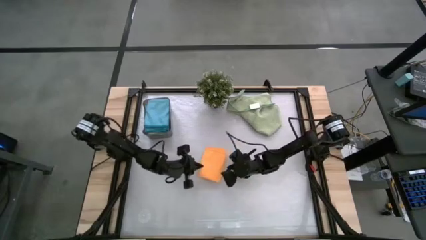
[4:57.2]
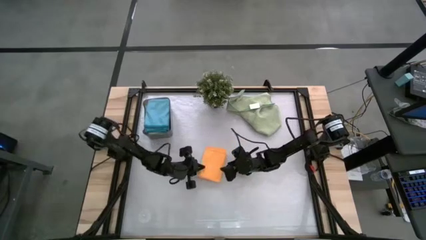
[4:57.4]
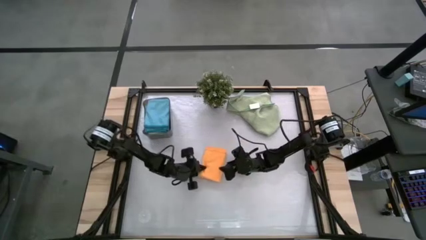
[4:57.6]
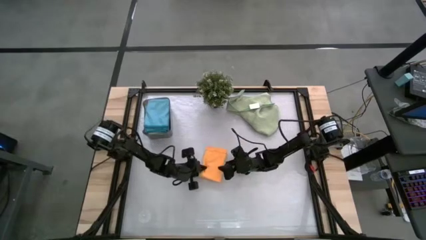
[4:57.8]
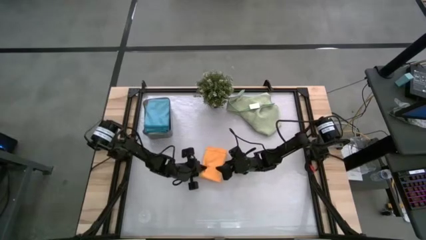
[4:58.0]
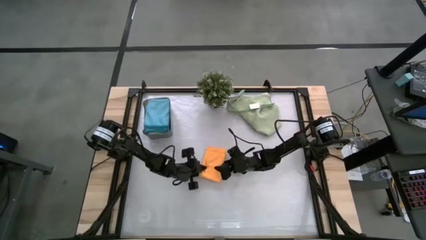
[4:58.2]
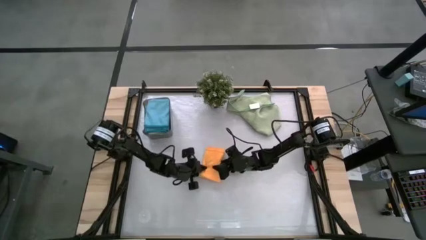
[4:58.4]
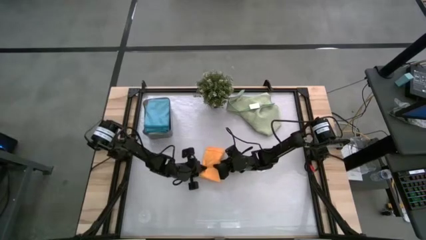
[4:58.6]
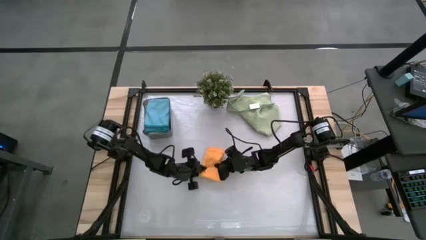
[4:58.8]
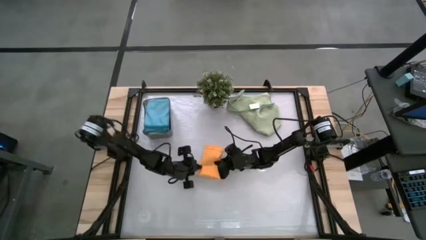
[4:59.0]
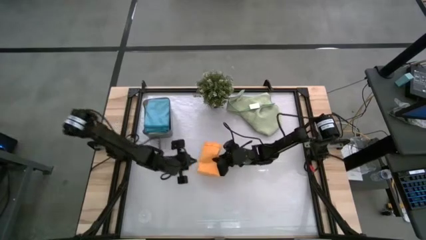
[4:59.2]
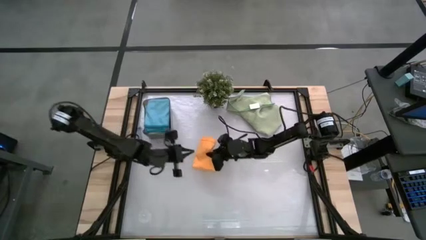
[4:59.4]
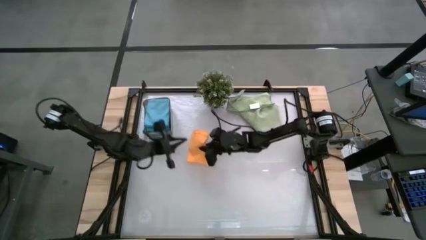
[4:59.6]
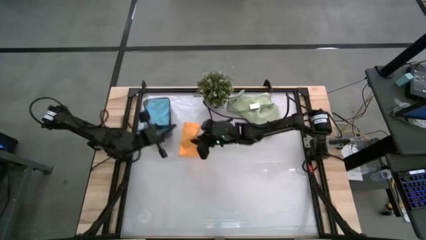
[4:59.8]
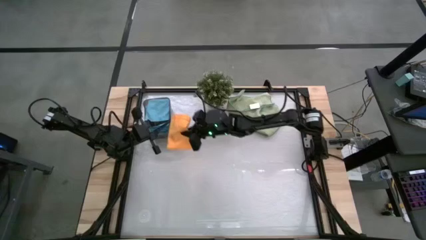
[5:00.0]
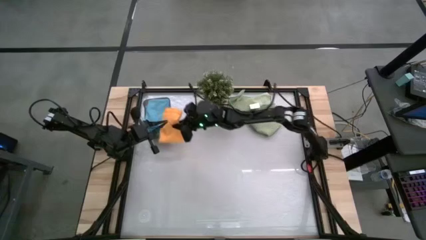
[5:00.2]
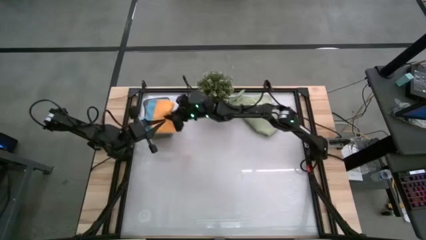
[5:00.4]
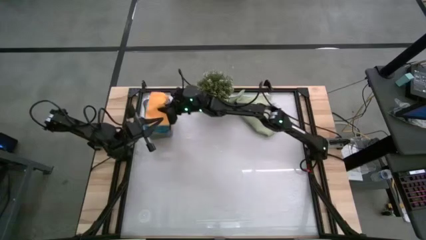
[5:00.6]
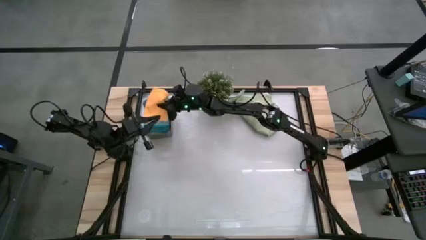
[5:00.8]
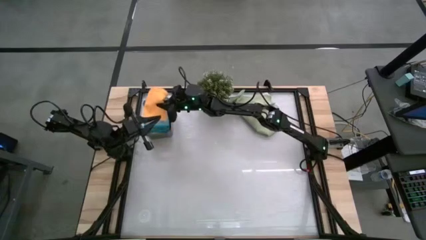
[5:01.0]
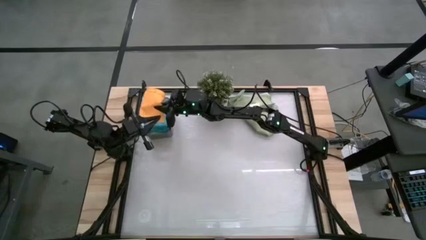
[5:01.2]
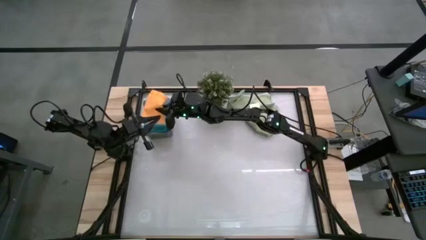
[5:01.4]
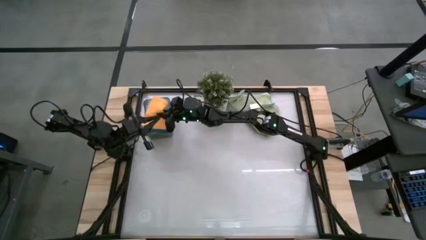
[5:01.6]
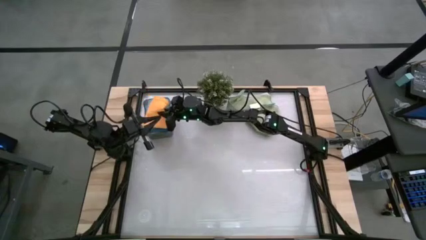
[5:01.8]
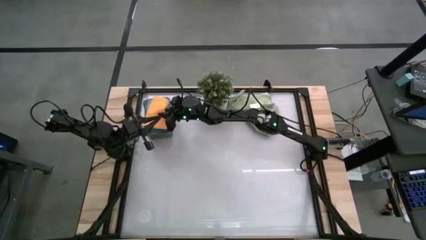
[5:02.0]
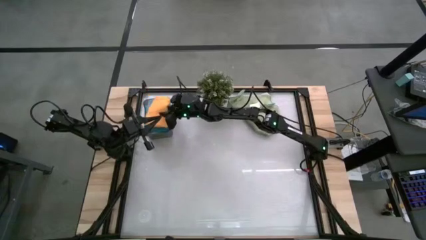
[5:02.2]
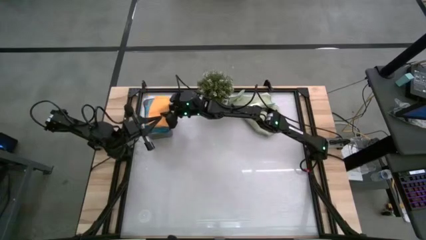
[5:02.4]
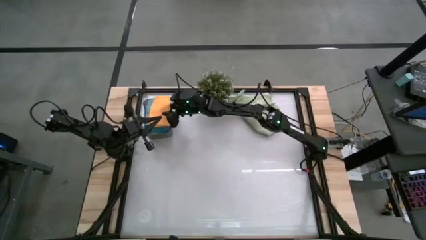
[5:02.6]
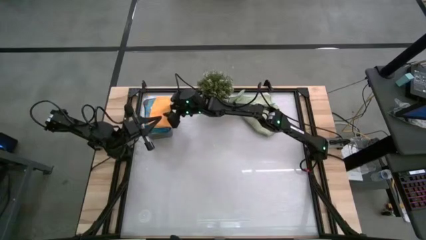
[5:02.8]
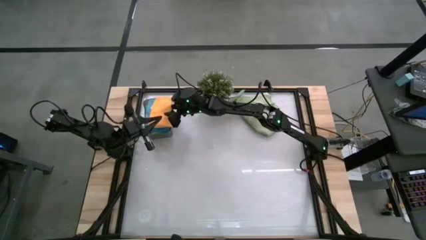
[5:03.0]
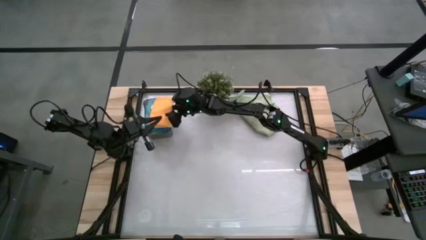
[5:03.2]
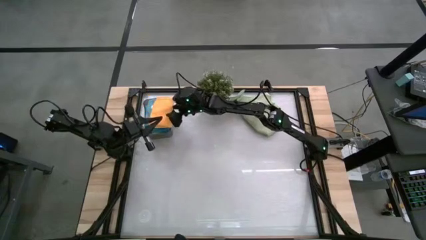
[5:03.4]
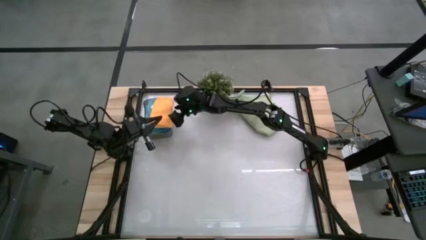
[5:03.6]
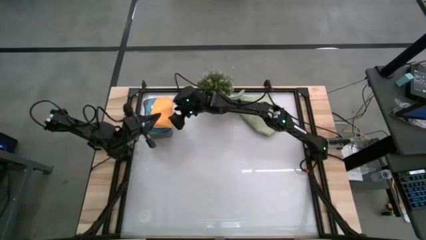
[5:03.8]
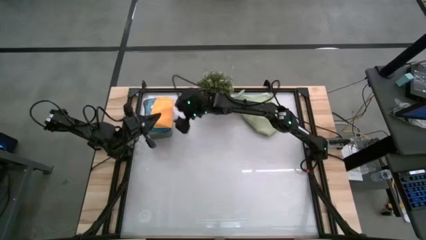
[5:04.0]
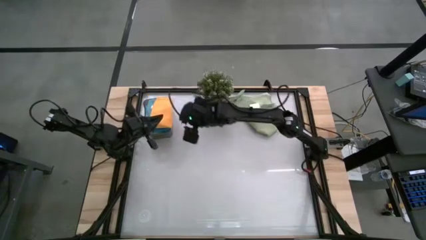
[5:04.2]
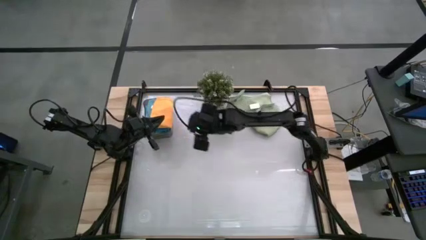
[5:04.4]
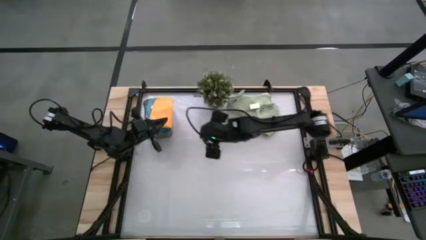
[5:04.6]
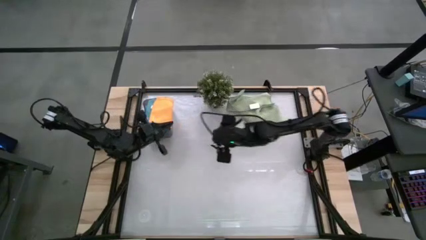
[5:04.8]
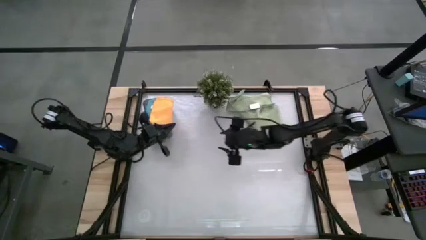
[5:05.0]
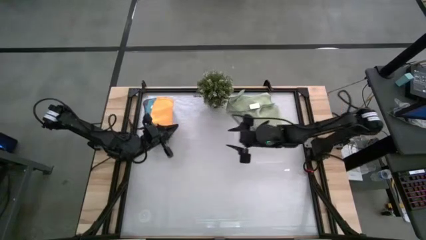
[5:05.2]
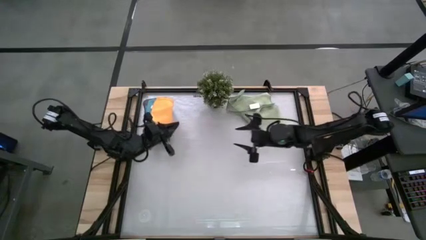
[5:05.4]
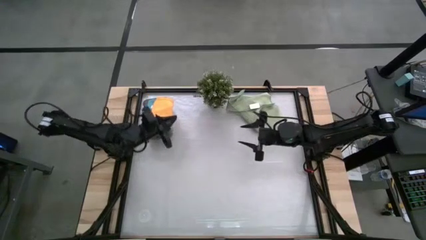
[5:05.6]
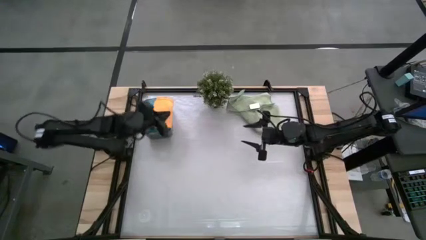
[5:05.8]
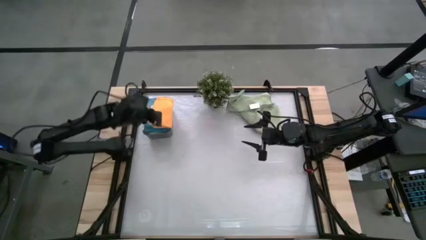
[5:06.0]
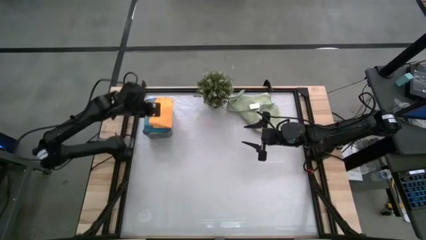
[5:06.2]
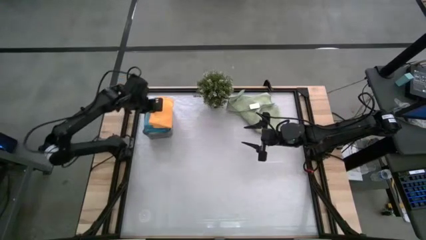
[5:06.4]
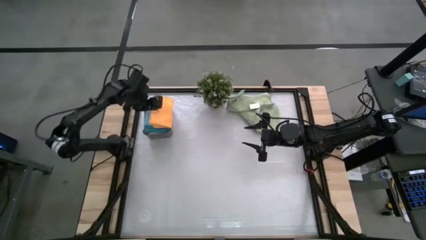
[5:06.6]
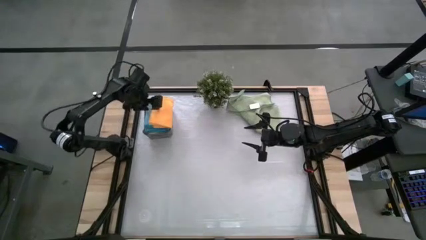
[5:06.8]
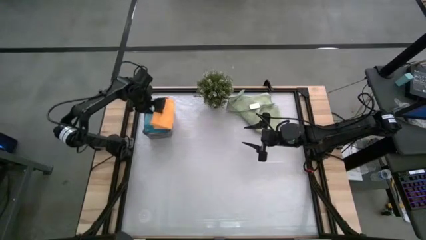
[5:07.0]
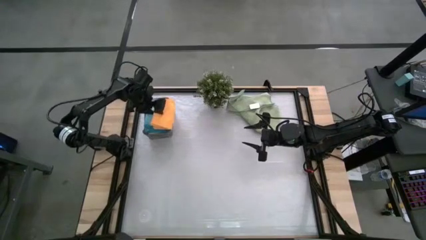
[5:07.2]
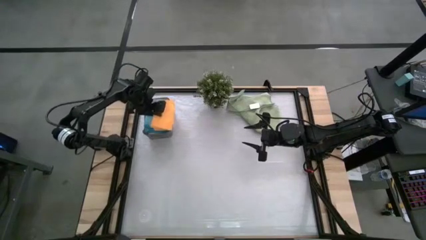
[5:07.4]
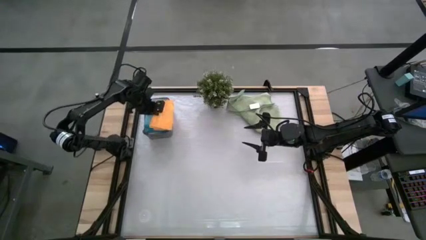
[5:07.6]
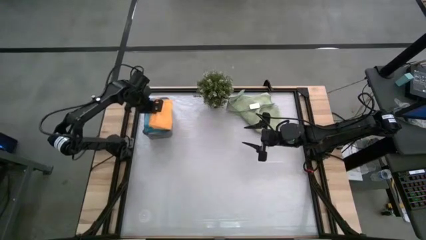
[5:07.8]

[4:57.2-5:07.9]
Task: Fold microfiber towels
Put the orange microfiber cloth into the black bin

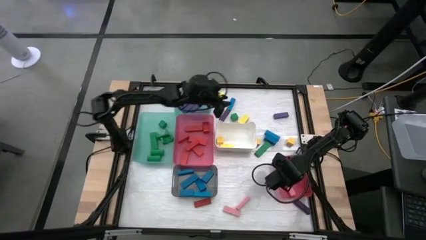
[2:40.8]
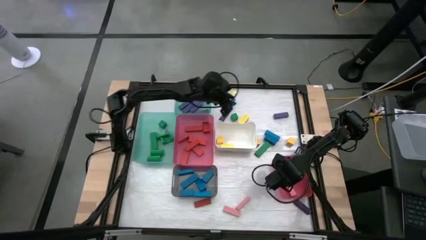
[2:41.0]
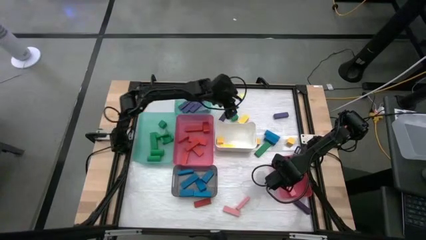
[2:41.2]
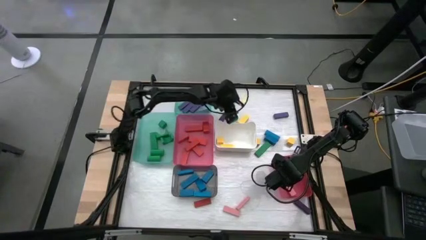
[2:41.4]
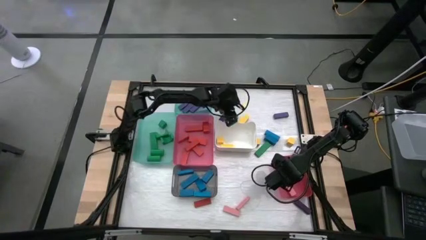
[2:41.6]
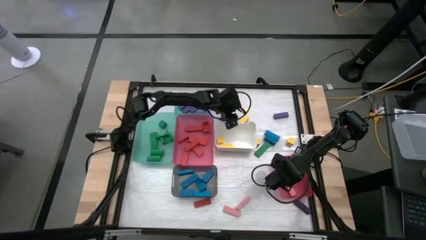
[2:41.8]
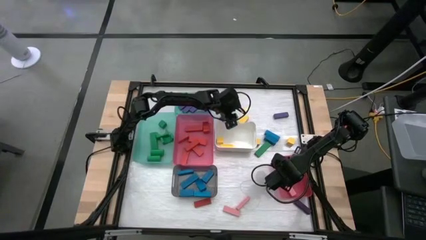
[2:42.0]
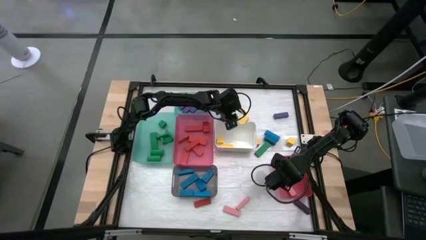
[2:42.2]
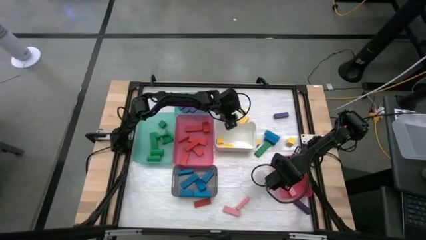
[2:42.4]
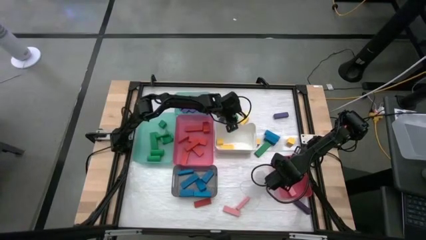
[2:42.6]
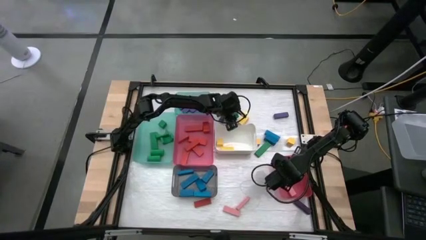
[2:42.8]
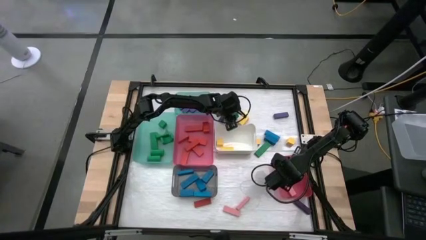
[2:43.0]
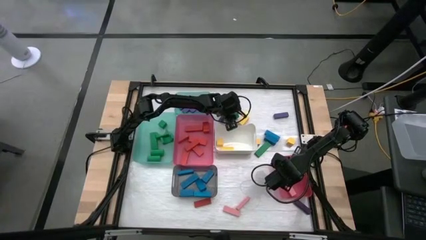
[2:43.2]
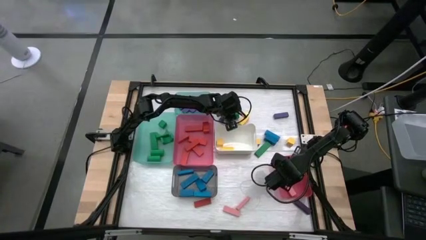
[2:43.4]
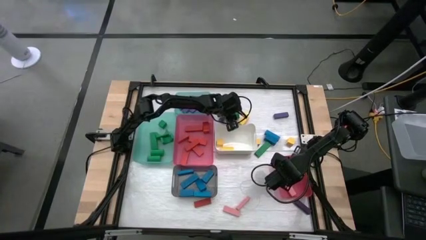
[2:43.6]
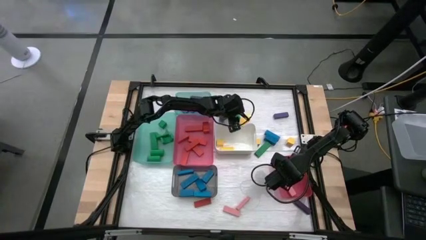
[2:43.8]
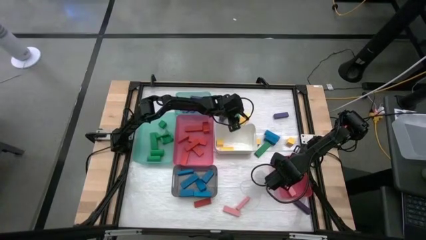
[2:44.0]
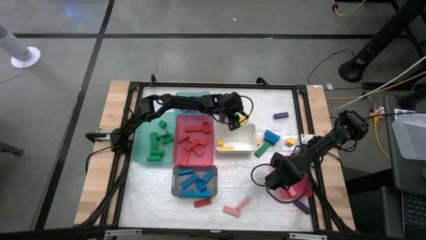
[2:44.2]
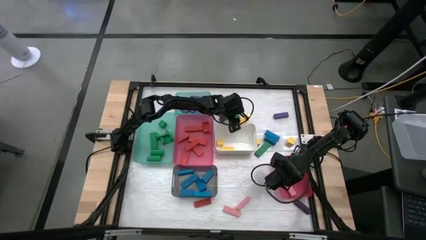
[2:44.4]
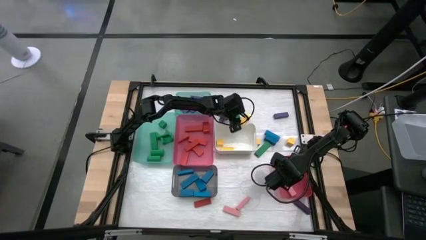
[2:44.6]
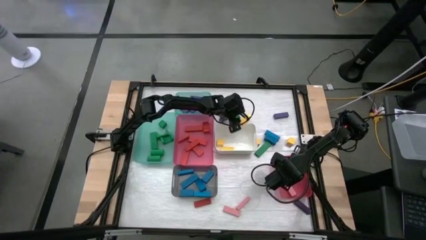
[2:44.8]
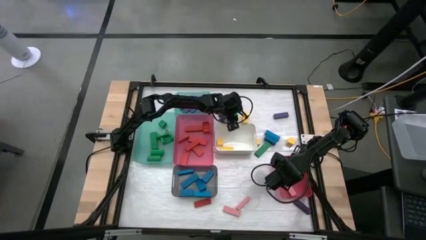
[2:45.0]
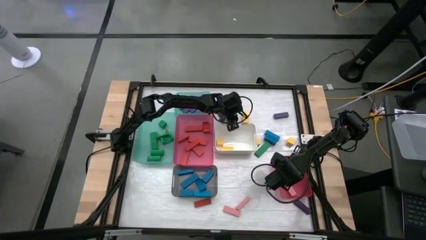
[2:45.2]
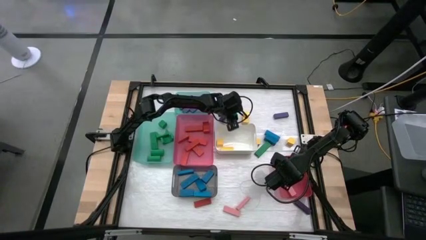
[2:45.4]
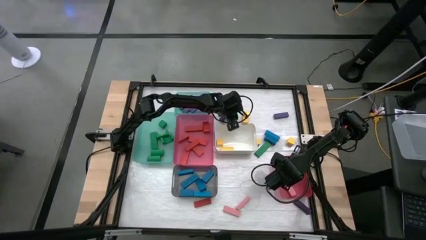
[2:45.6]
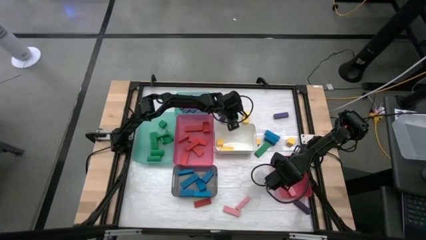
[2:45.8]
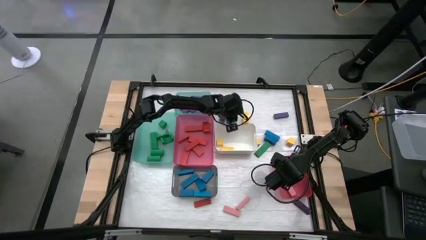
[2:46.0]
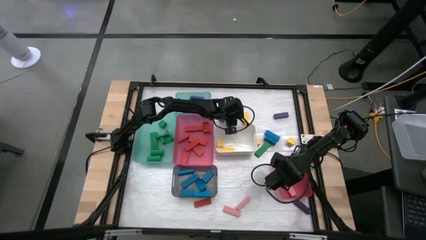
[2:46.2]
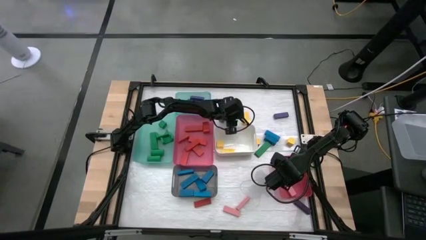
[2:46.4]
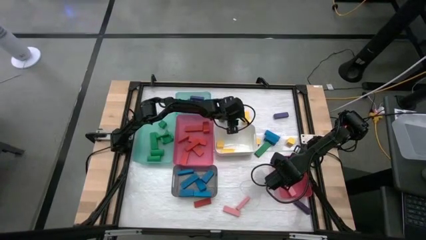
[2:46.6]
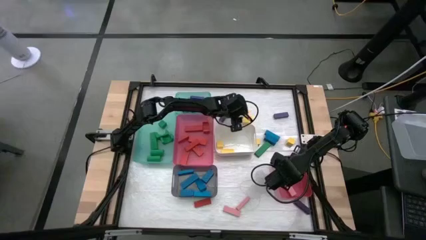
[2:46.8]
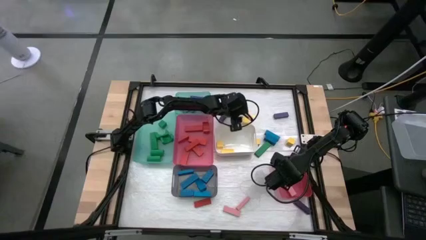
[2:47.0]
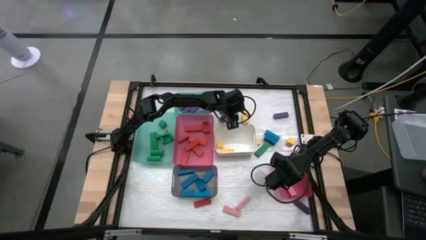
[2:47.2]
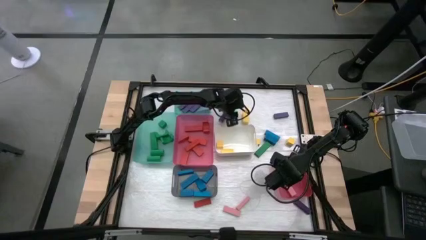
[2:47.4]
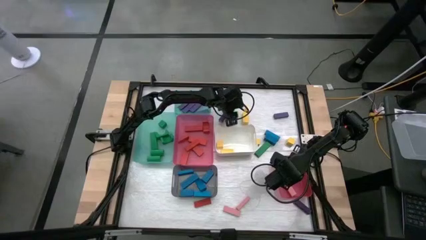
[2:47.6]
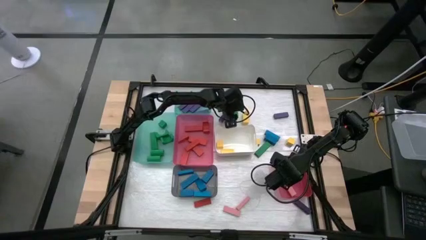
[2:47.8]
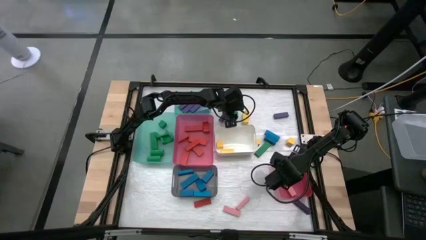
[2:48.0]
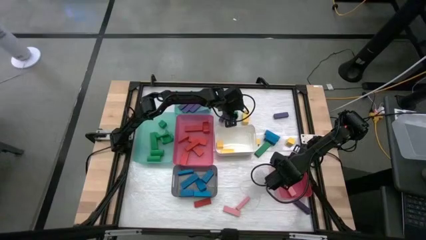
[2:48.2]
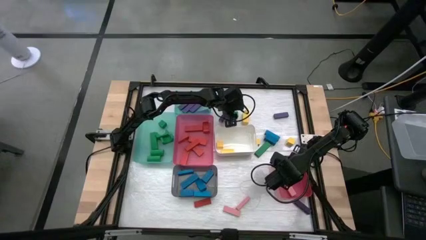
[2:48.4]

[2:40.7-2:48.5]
Task: Sort blocks
Put the green block into the bottom green bin
